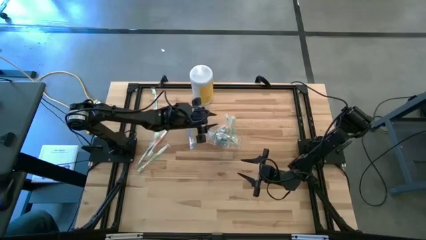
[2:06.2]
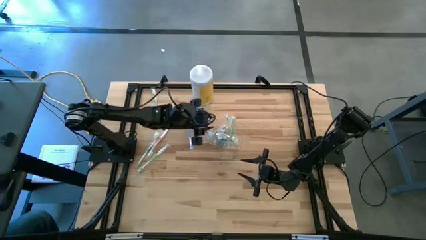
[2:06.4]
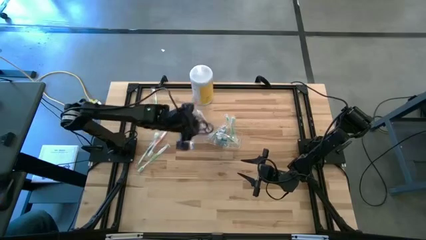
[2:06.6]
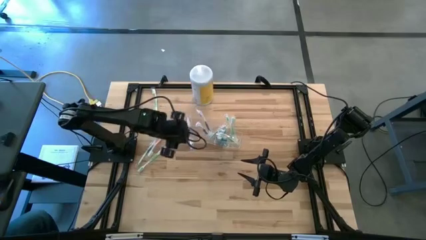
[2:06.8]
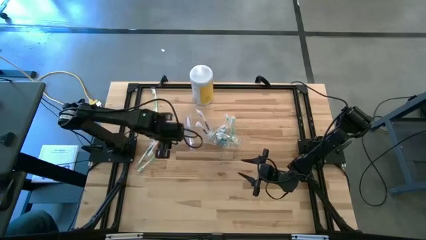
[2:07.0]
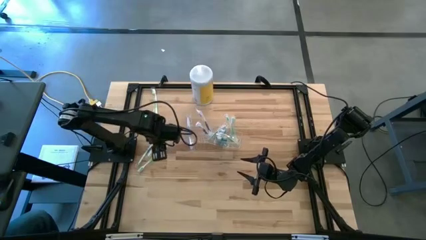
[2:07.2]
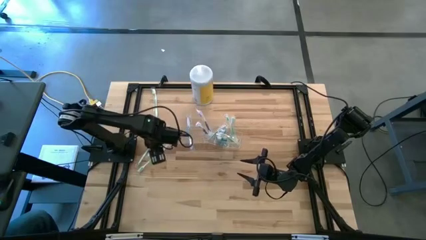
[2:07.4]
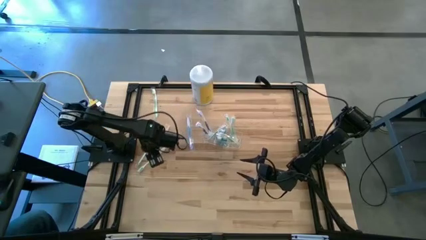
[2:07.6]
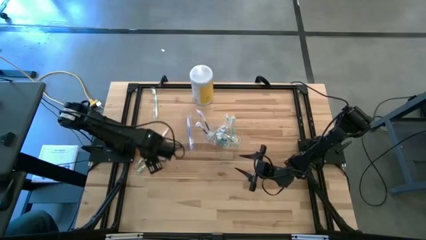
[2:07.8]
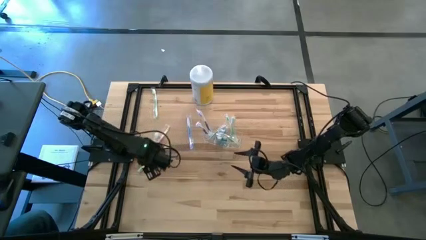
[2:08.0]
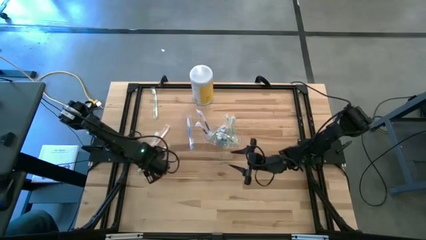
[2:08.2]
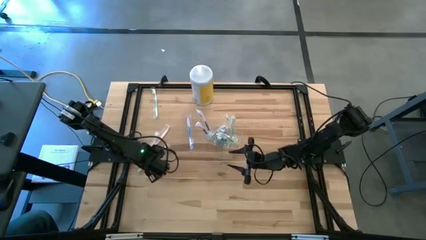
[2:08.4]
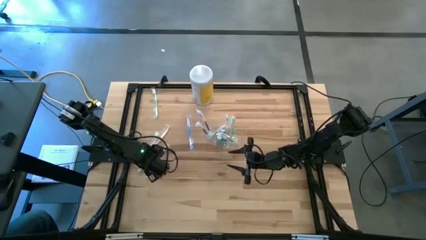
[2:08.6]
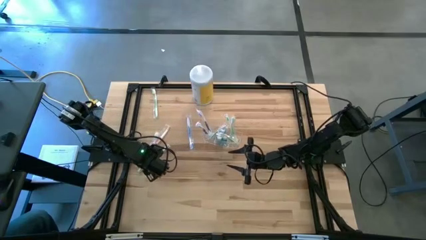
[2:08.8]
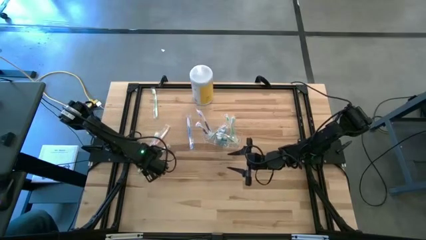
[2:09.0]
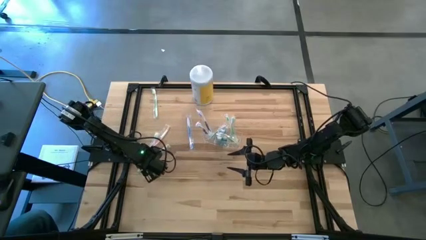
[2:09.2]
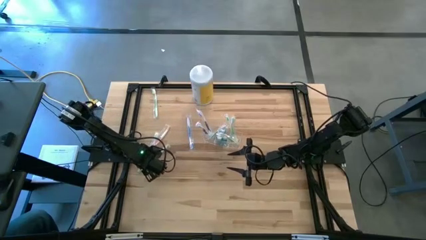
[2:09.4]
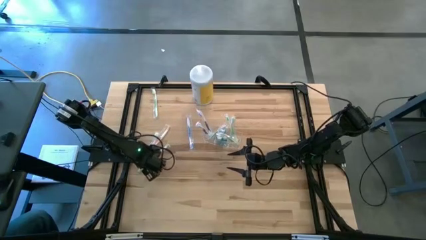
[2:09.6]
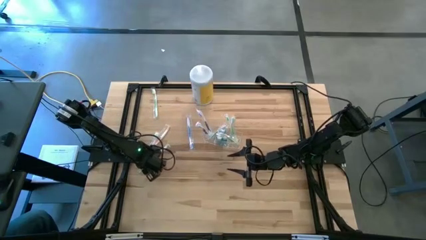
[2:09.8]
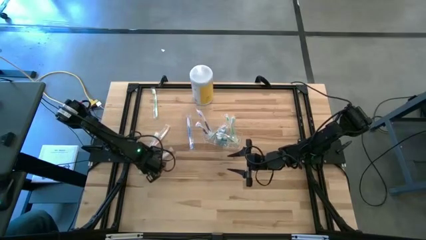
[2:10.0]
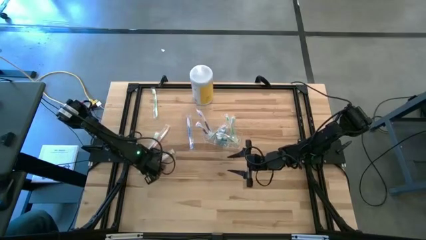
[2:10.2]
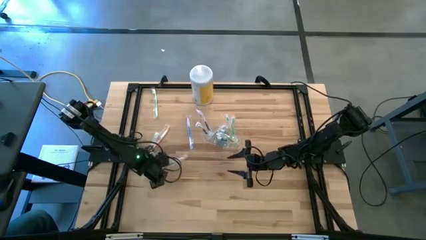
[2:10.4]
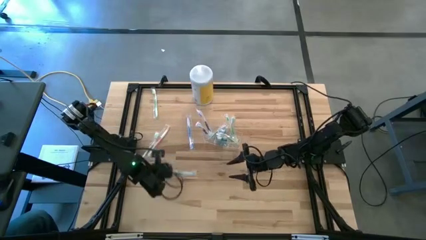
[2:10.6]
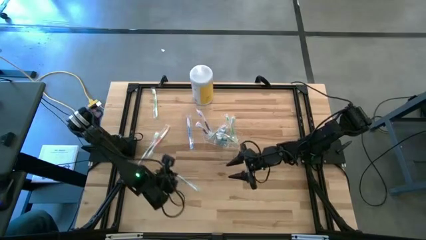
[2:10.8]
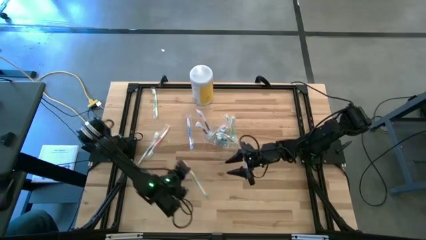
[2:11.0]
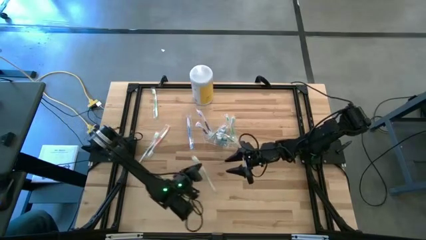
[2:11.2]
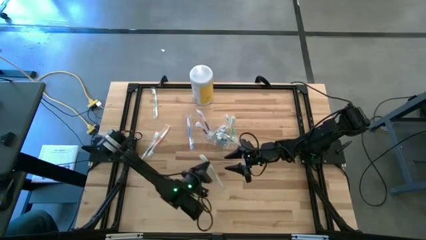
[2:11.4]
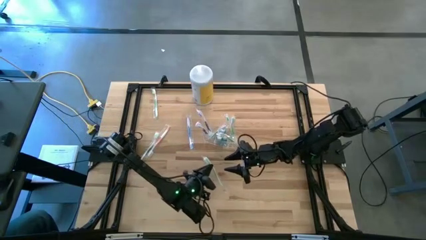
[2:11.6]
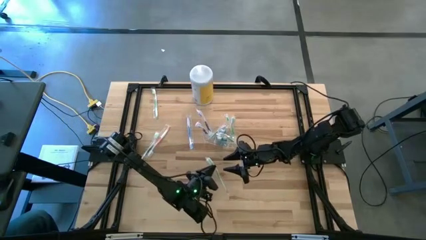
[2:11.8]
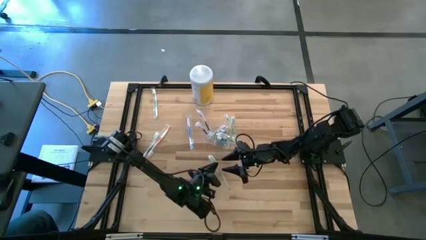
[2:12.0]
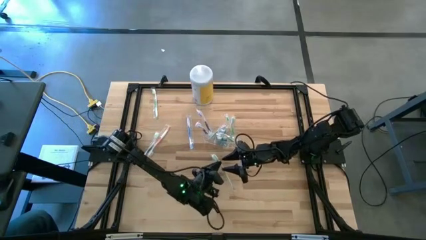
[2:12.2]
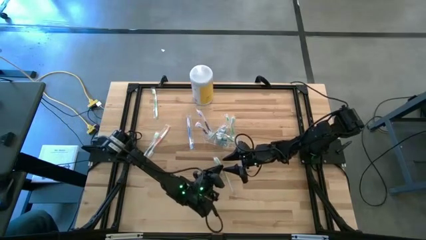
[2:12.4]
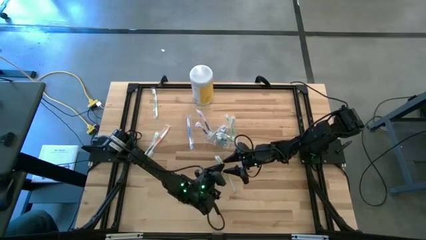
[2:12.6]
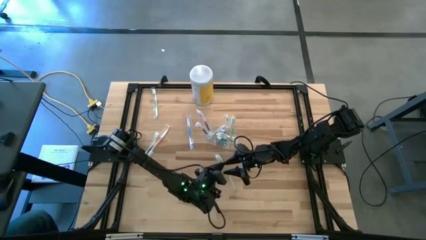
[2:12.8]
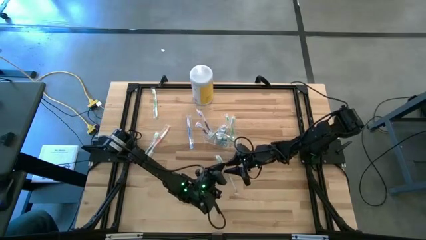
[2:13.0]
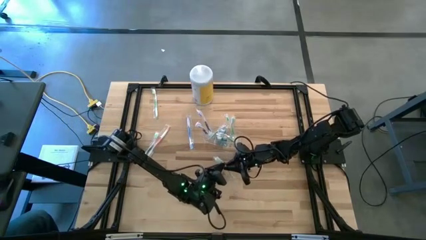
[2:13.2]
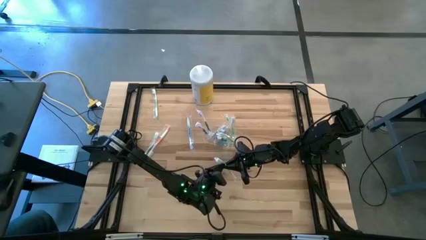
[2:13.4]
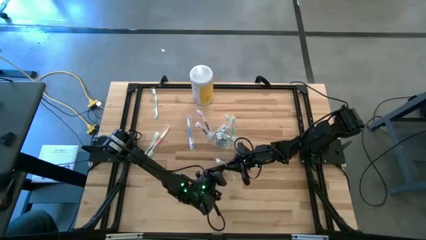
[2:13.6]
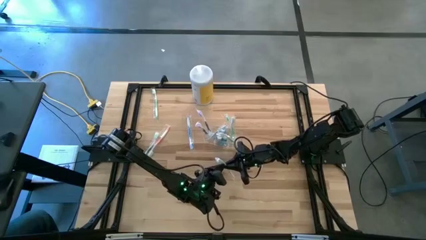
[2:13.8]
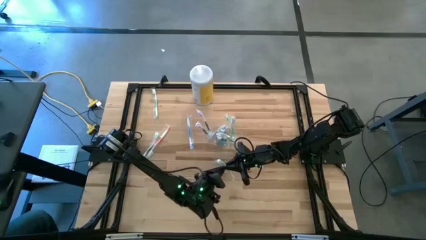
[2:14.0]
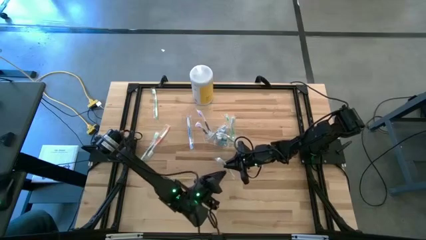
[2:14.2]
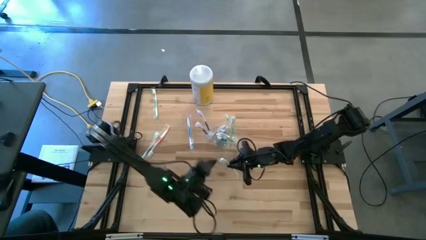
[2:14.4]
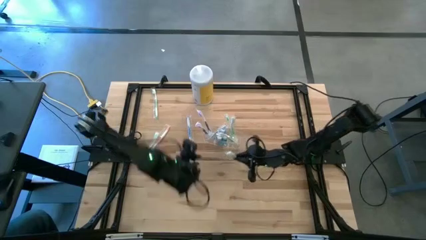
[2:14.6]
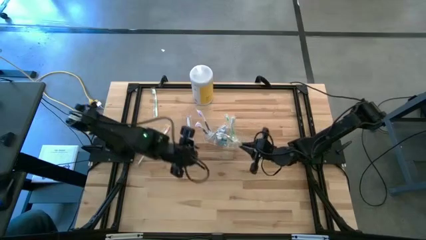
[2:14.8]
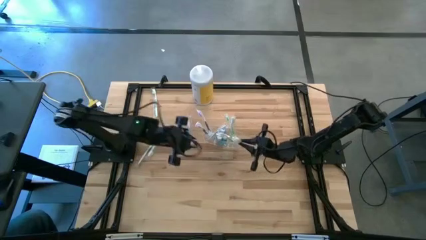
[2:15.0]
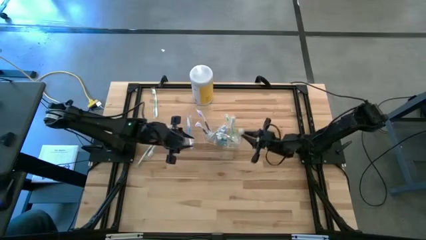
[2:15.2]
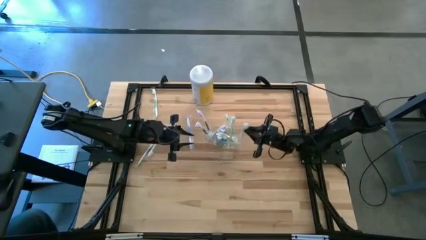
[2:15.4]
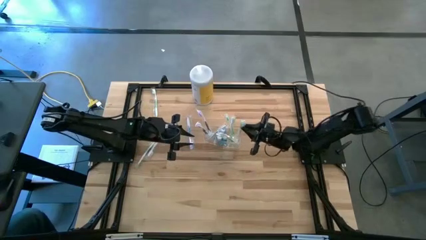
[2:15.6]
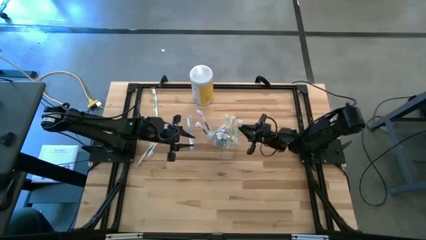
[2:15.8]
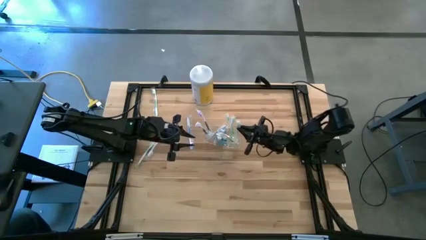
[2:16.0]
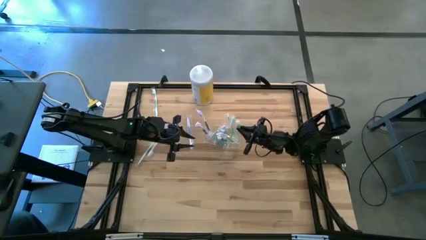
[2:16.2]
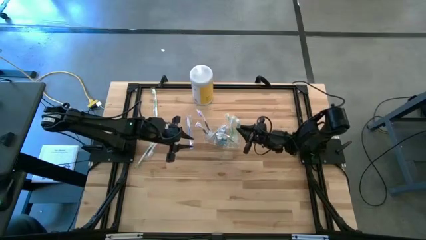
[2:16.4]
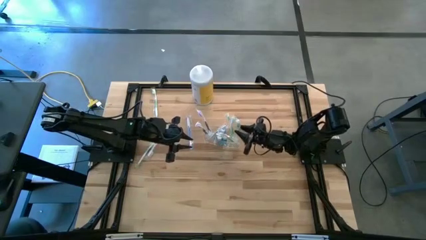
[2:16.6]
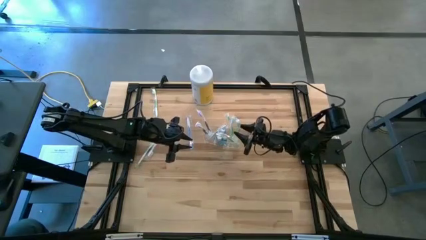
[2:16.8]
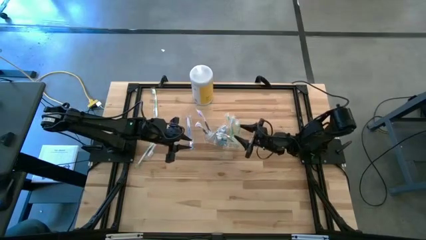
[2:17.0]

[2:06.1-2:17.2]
Task: Pick & Place toothbrushing station
Put the right green toothbrush into the right section of the transparent organizer
